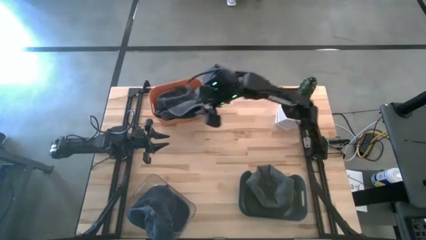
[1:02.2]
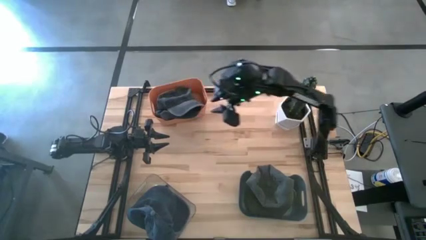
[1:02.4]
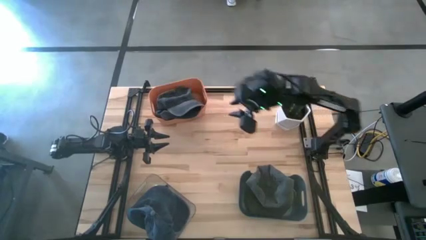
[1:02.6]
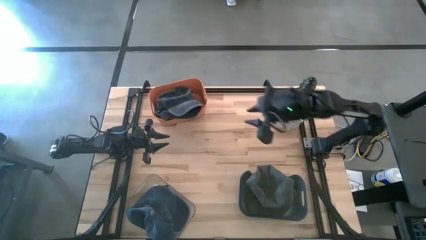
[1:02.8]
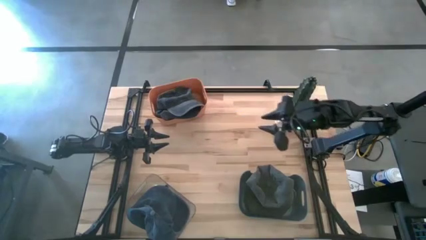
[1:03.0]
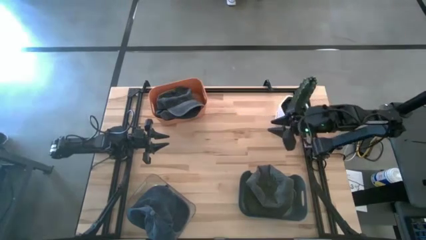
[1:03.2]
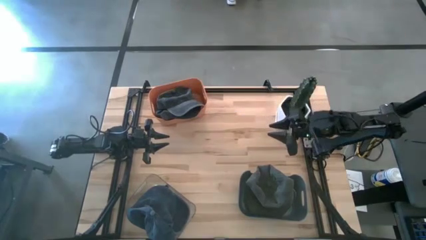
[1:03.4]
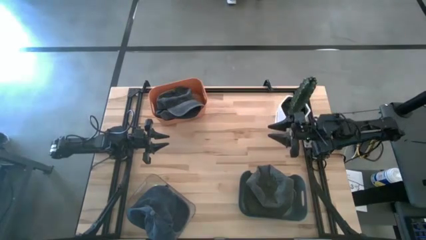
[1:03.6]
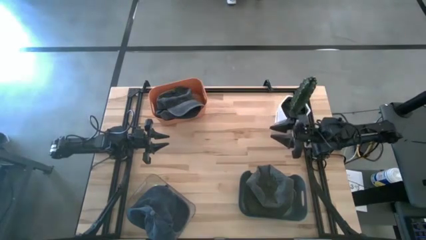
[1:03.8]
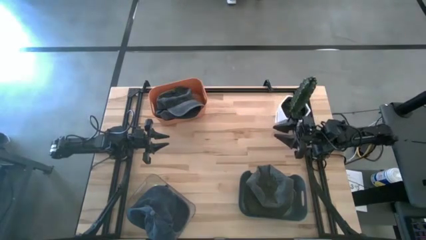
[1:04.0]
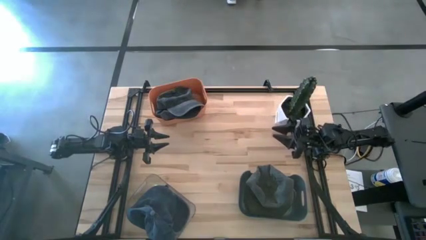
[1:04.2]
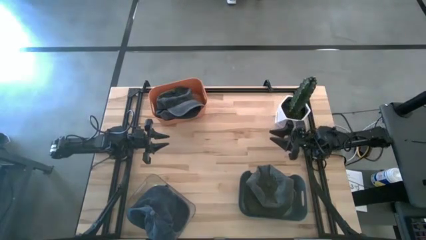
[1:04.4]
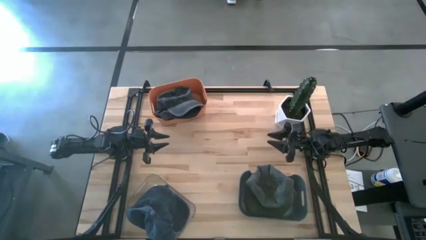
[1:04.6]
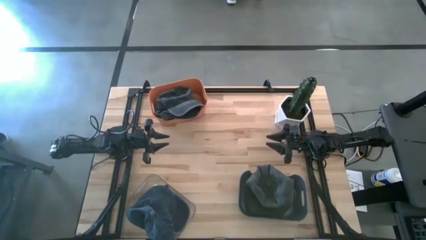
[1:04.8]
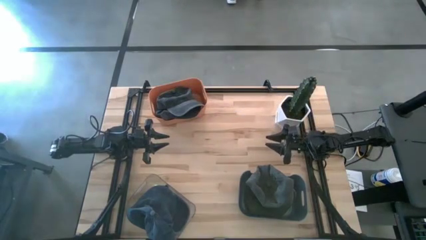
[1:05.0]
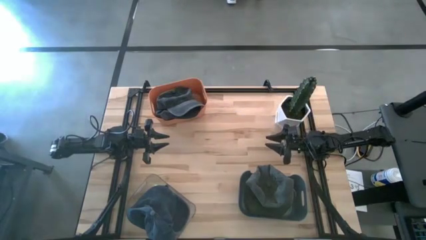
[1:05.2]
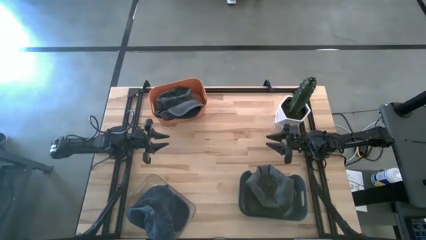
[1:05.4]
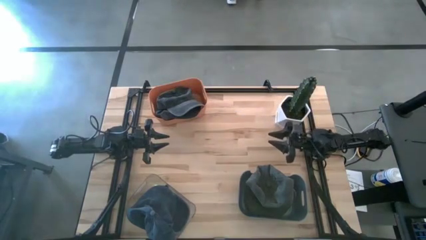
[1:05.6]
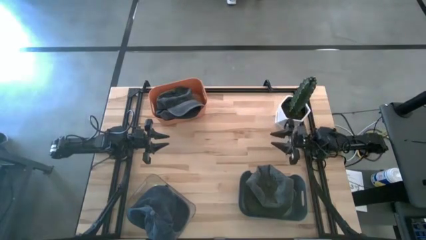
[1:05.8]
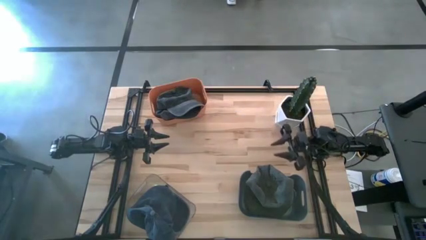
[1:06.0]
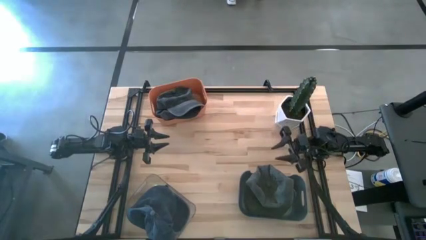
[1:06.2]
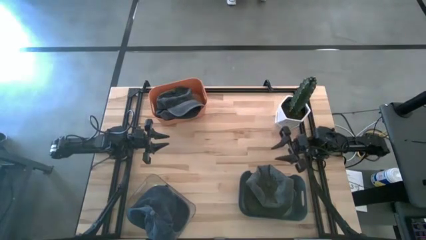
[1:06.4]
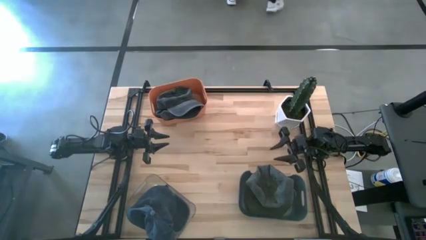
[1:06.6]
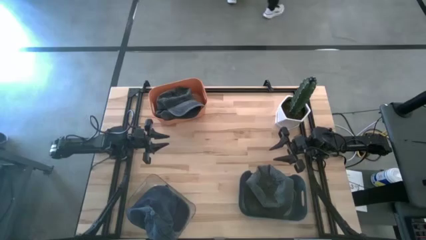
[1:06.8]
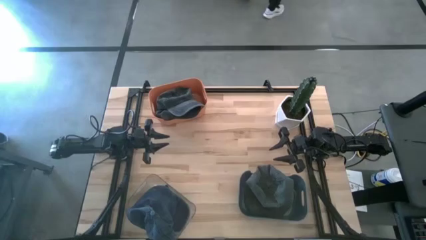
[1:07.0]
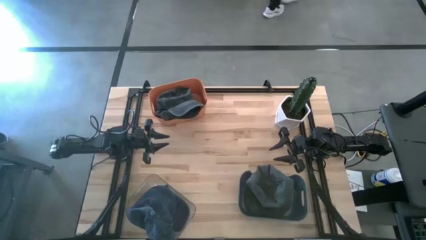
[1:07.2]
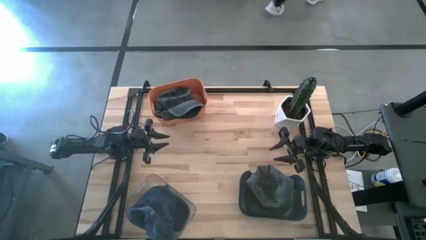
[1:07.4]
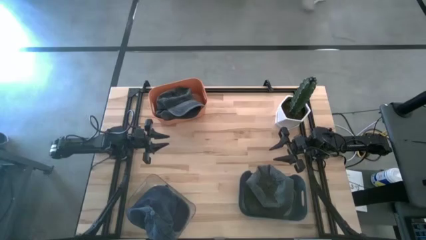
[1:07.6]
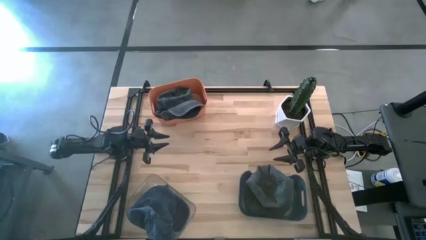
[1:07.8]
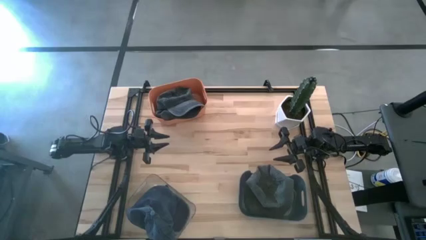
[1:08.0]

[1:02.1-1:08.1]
Task: Pick & Place hat
Return to Home Position

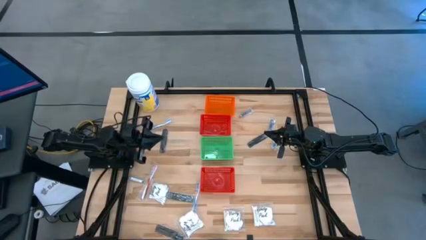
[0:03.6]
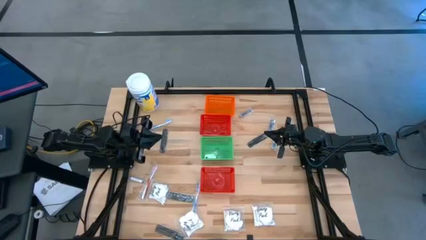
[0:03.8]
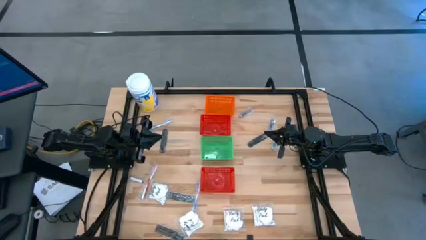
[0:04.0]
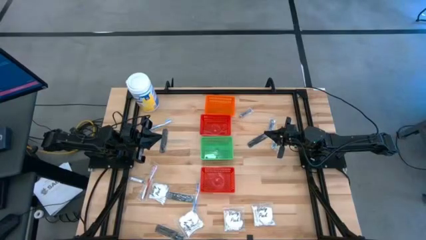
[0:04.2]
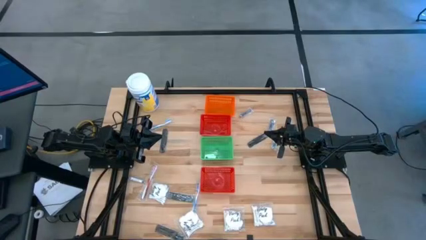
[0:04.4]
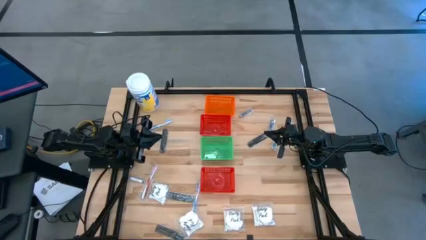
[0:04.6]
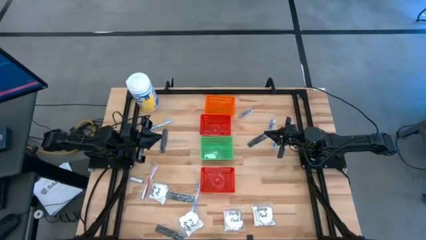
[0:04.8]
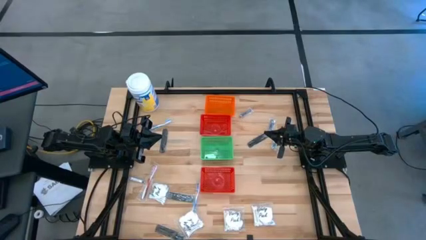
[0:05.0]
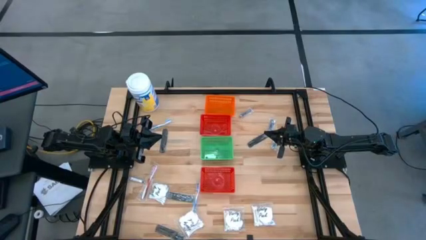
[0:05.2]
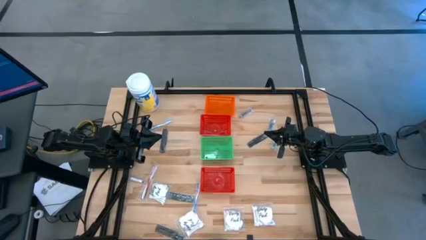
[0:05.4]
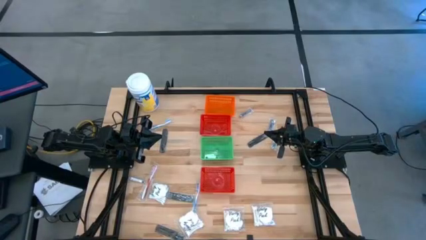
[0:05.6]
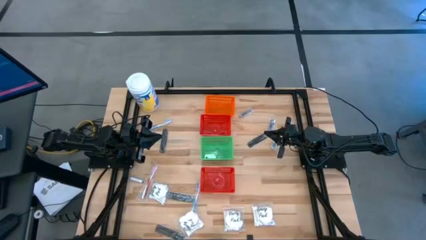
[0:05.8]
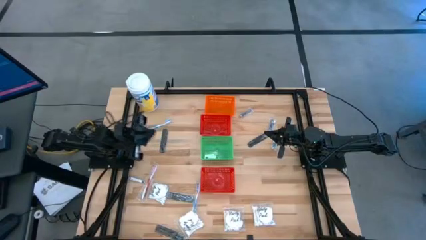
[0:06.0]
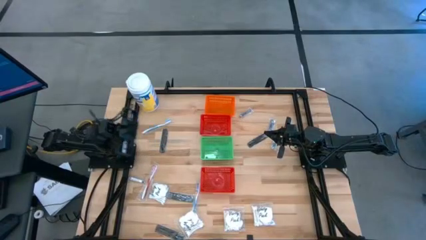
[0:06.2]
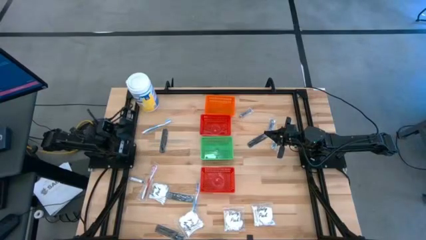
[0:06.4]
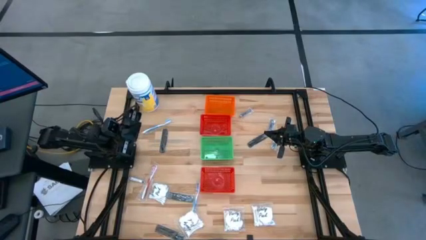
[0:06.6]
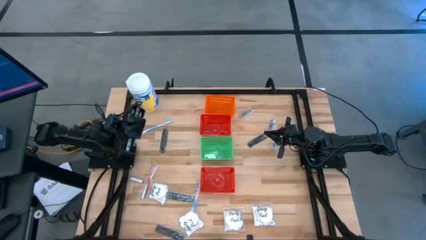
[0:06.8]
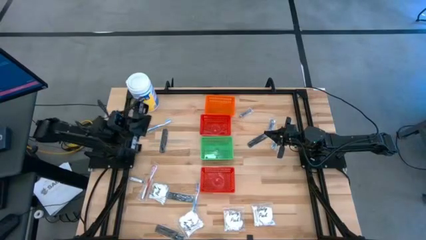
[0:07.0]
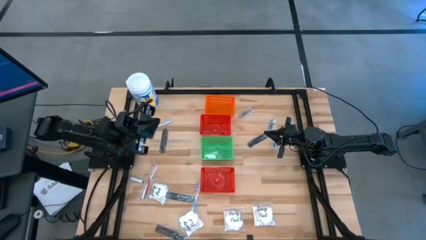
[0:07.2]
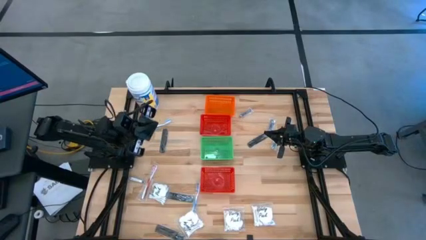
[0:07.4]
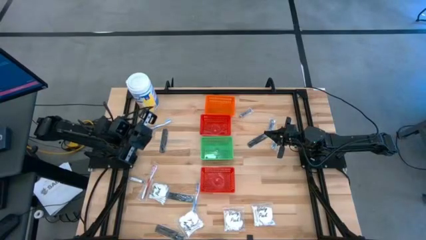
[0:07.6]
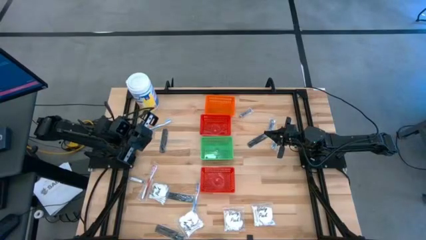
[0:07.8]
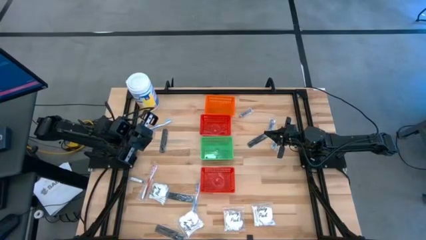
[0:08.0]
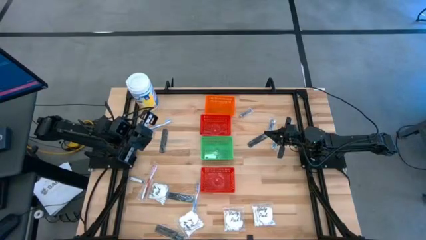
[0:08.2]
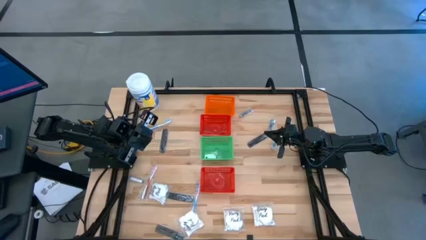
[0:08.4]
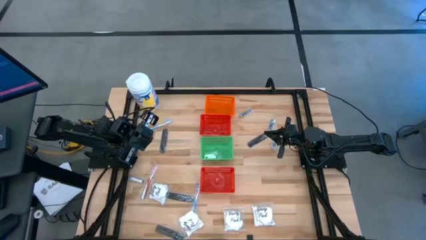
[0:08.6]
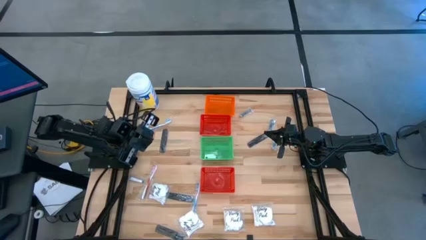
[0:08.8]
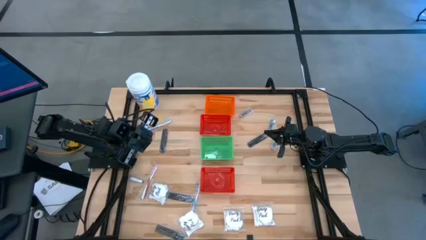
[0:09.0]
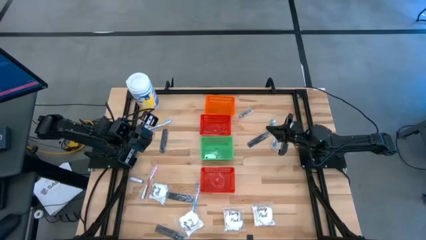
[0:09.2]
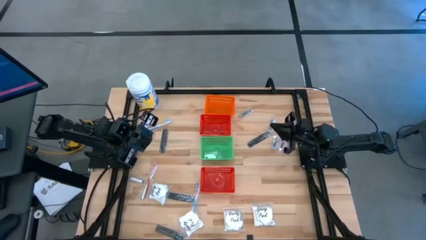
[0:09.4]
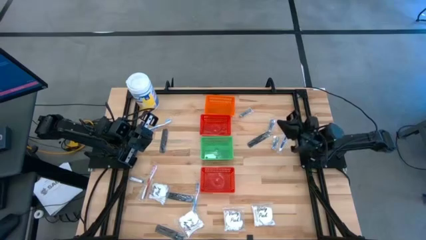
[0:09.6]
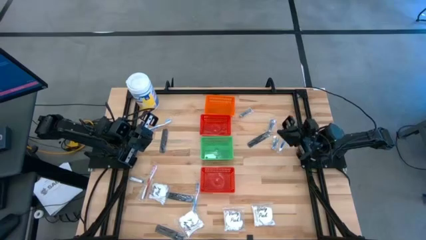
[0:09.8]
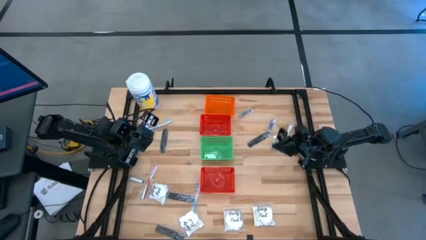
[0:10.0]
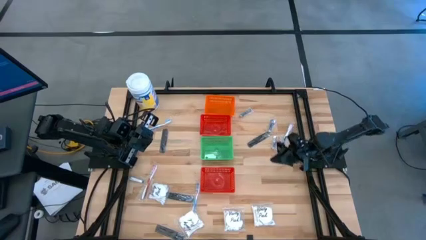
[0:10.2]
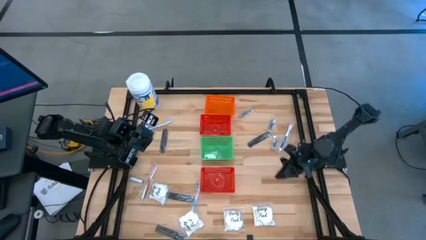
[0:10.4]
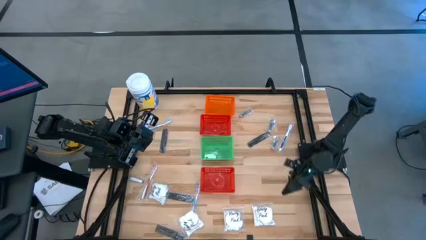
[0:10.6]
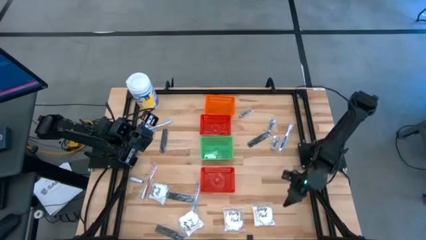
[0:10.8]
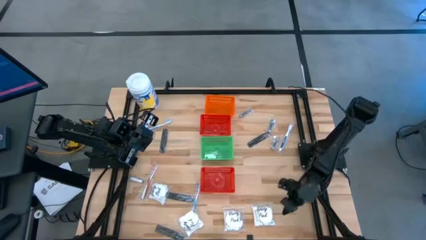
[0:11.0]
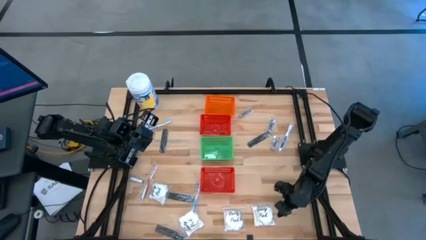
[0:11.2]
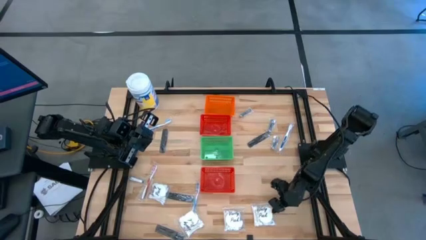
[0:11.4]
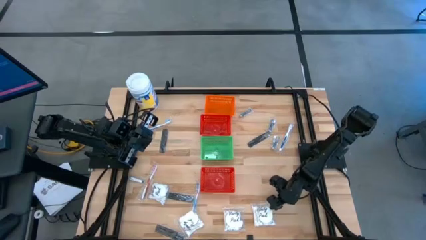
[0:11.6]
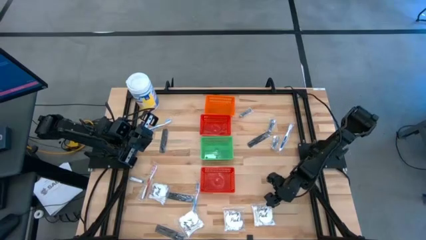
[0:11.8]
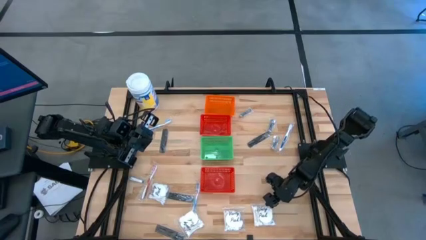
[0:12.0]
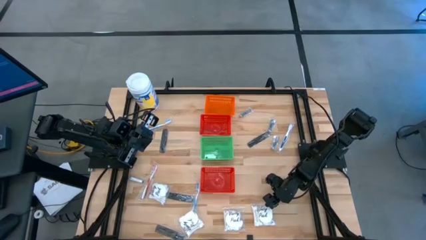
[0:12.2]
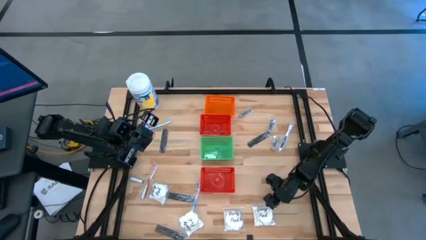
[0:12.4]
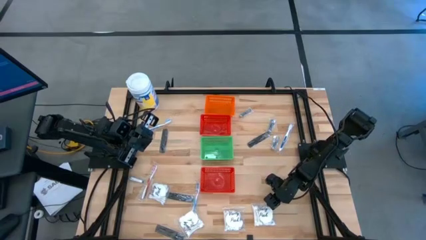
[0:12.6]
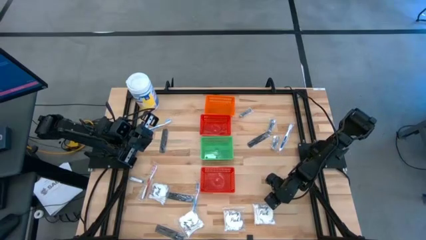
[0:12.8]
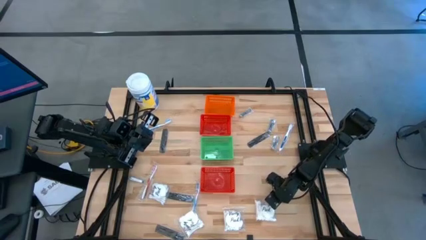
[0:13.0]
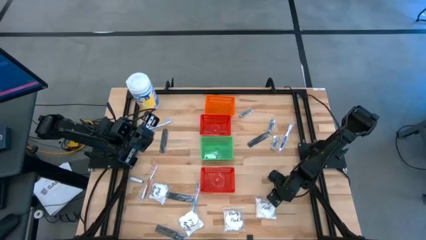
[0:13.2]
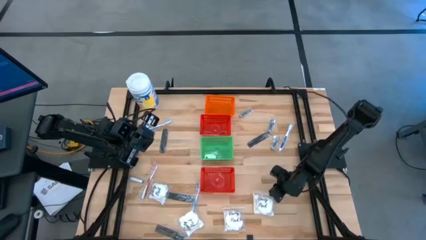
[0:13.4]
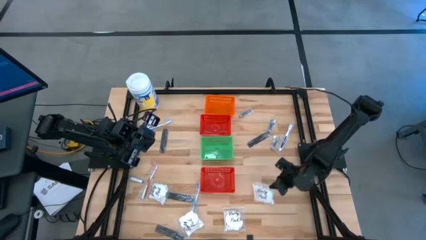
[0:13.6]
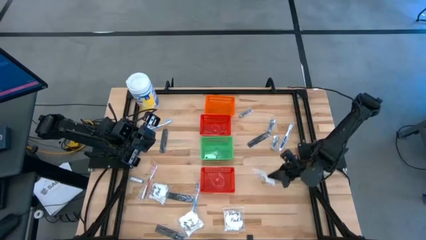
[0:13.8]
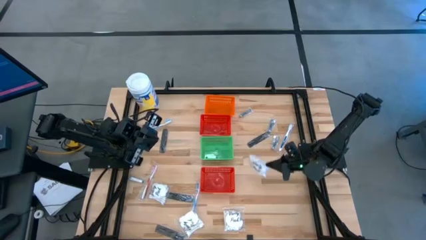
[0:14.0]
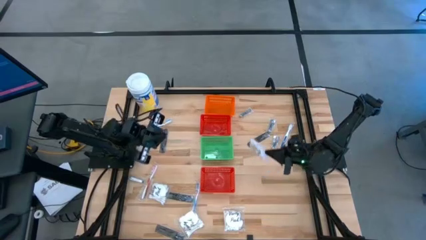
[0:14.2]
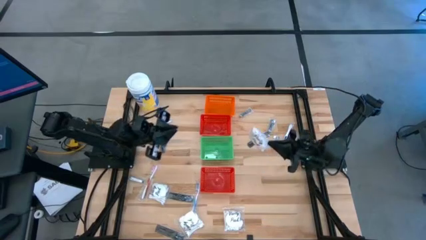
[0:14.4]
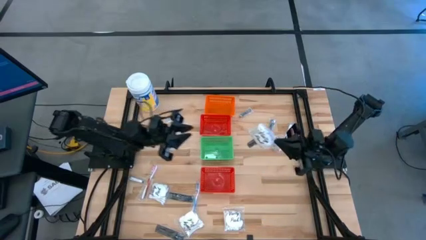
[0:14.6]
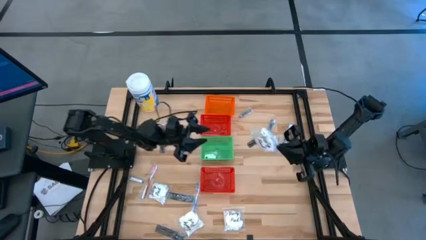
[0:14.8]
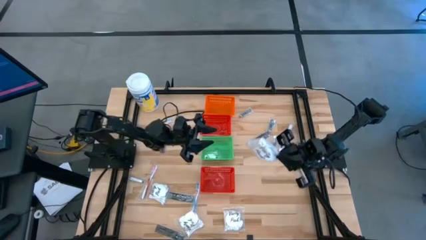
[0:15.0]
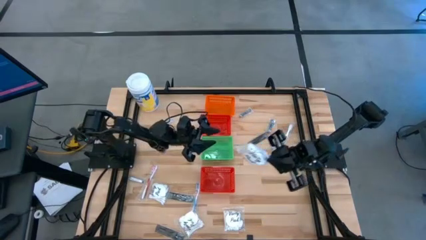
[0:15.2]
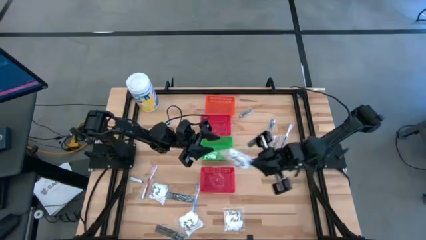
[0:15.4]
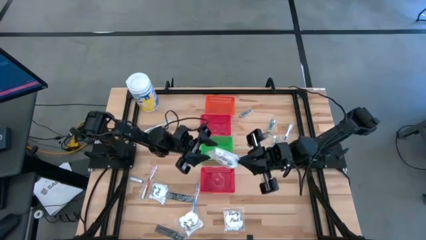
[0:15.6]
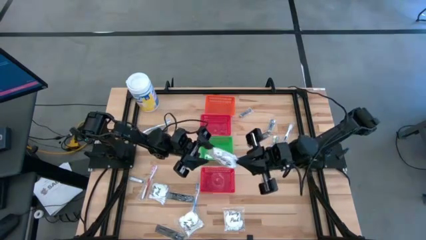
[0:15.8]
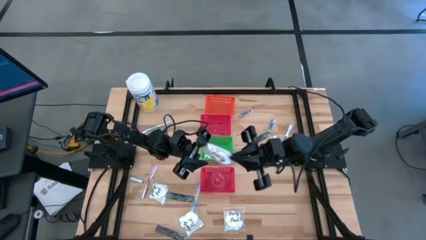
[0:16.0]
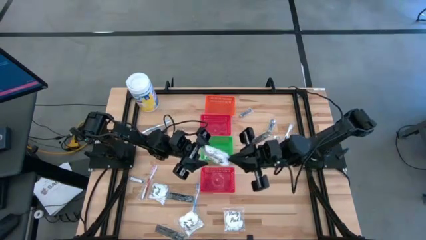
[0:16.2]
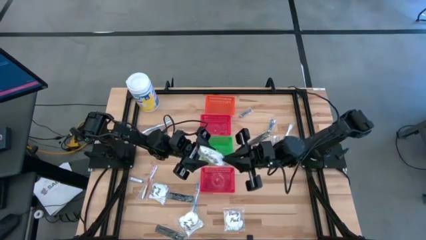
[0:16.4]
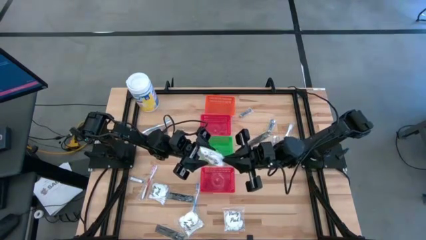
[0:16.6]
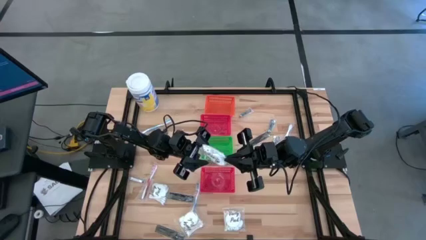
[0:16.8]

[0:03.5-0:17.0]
Task: Pick & Place Travel size toiletries
Put the transparent cotton pack into the orange basket
